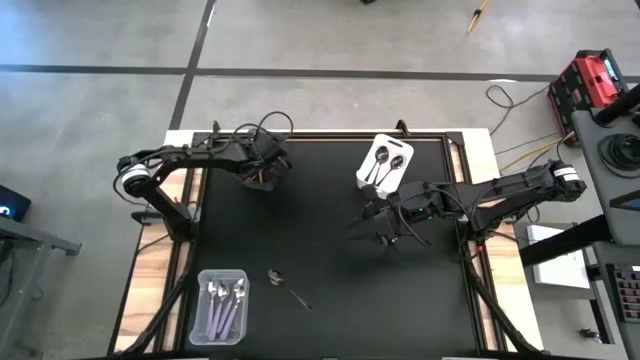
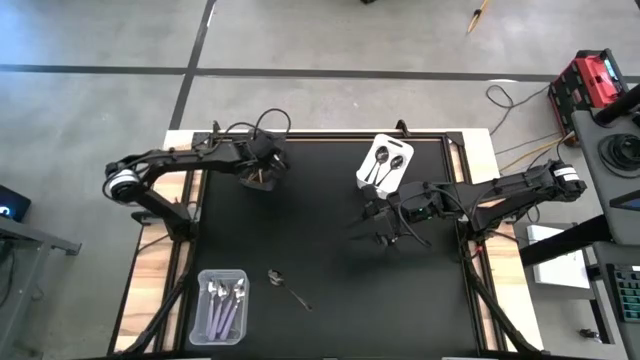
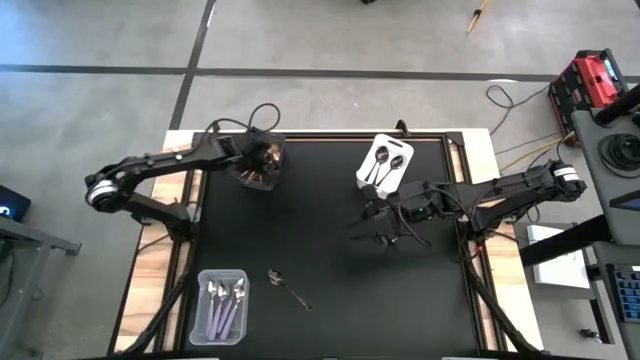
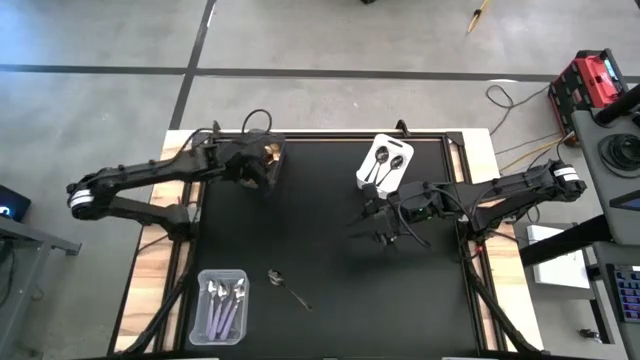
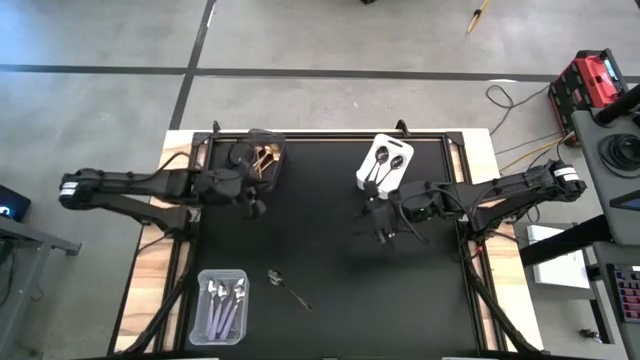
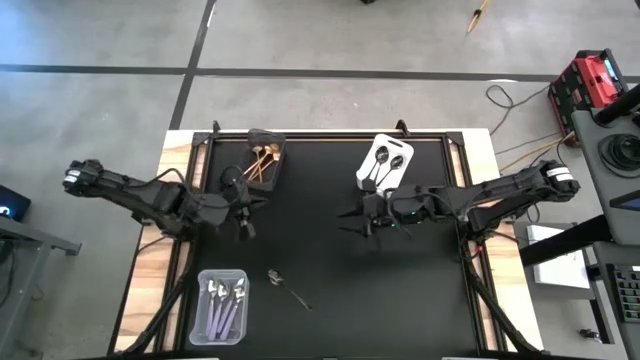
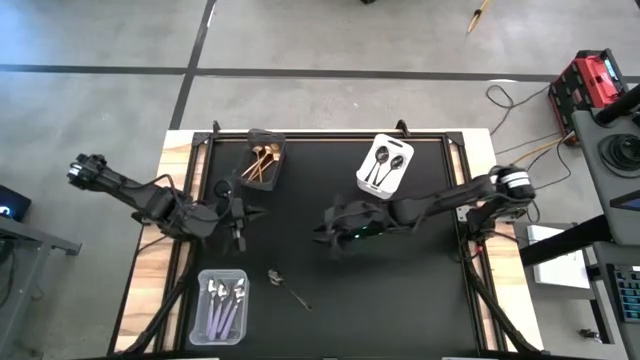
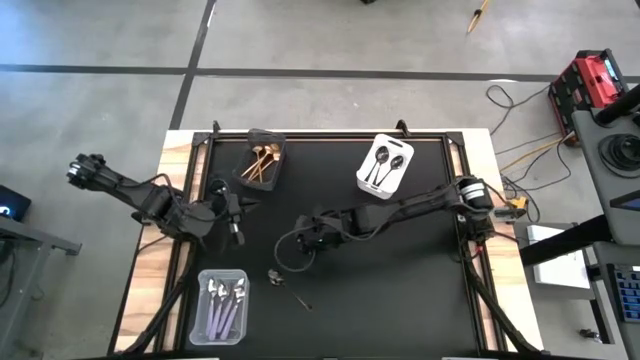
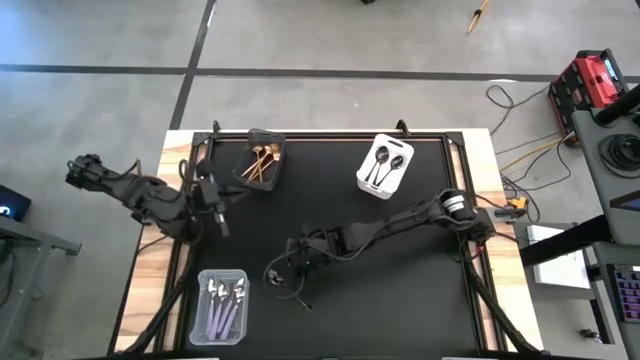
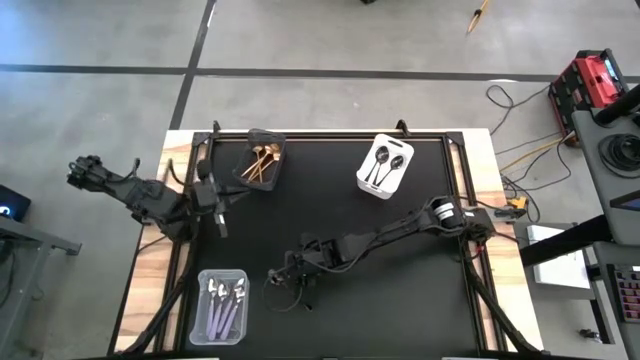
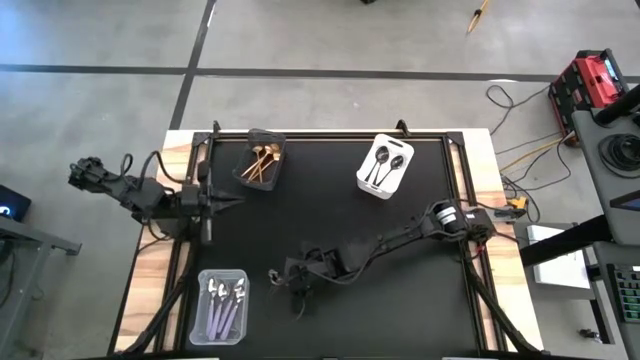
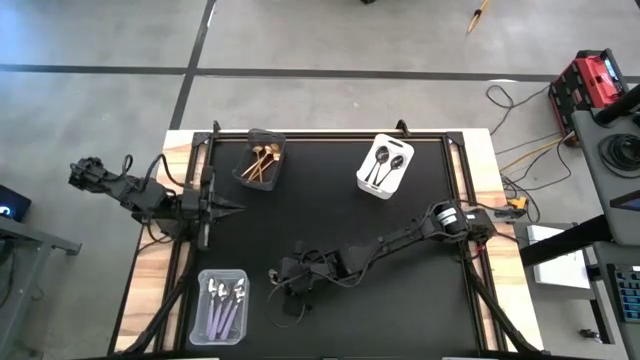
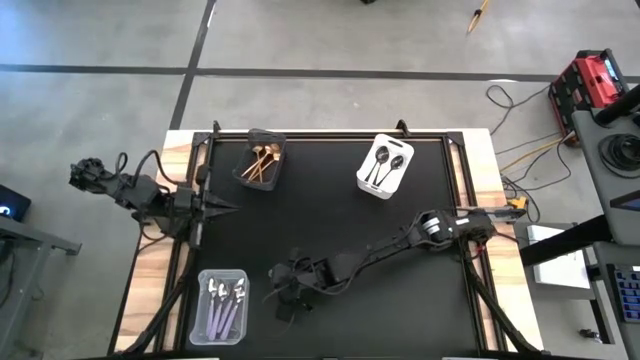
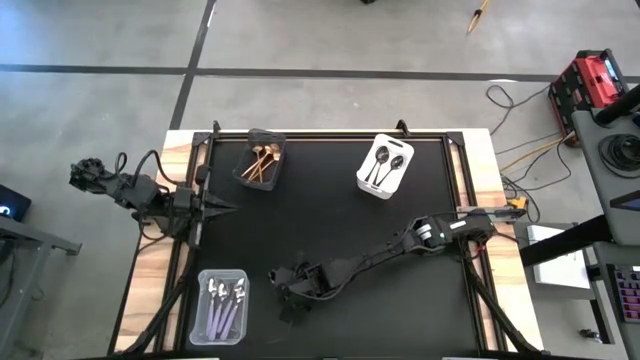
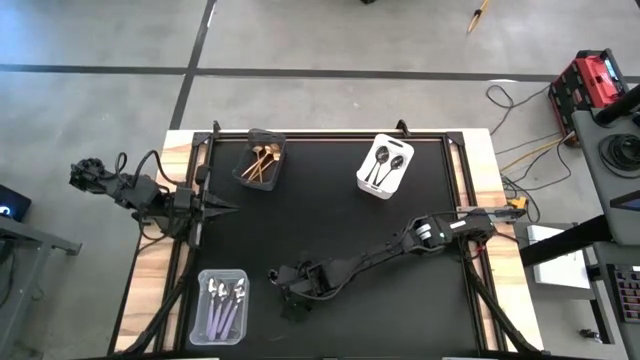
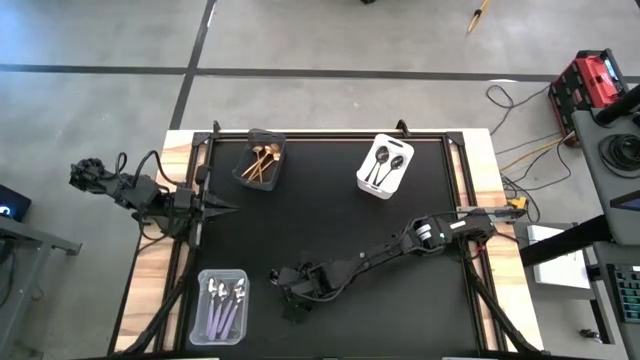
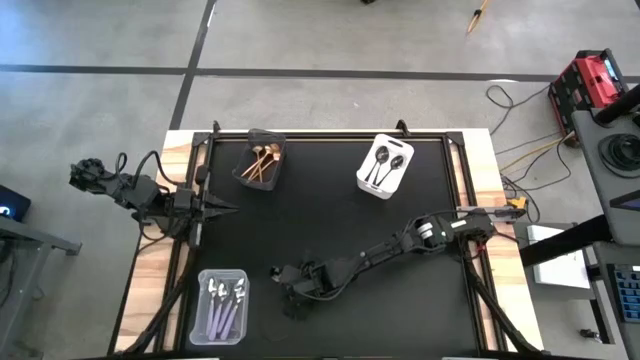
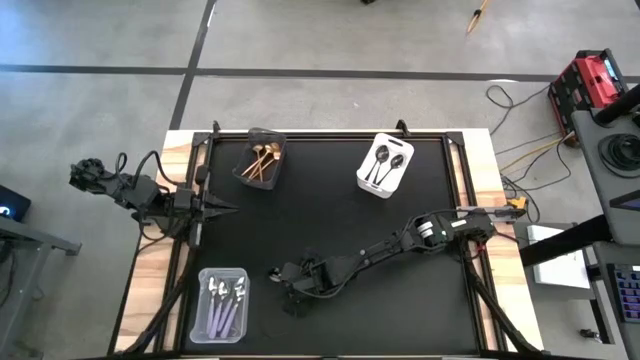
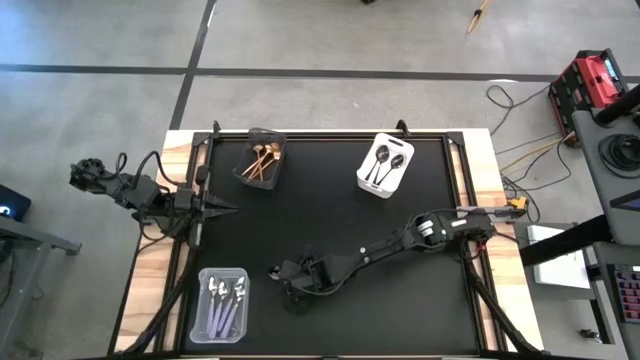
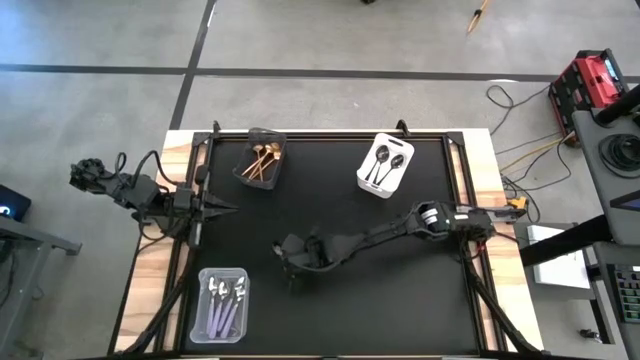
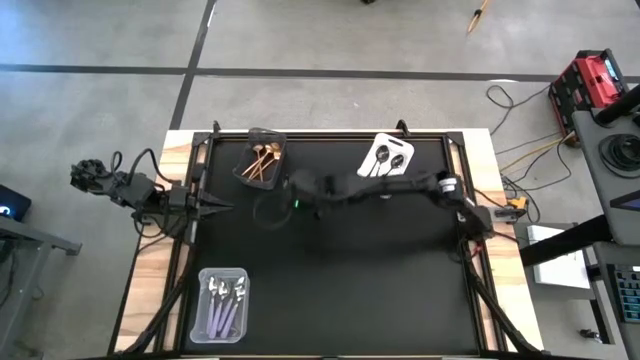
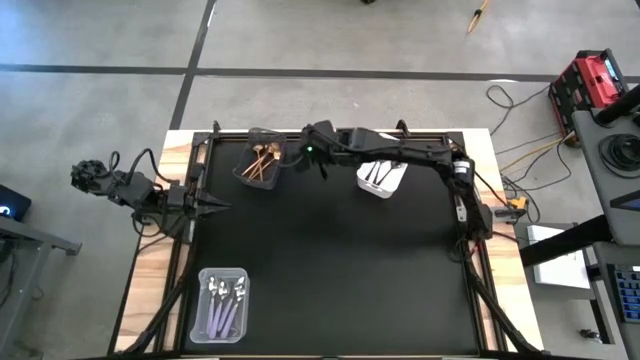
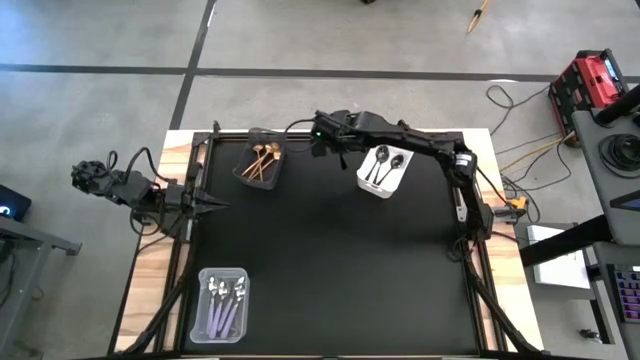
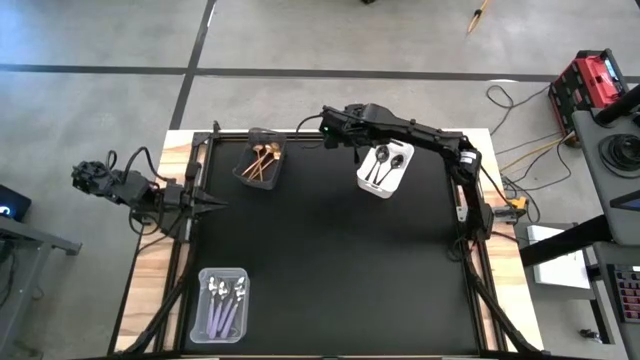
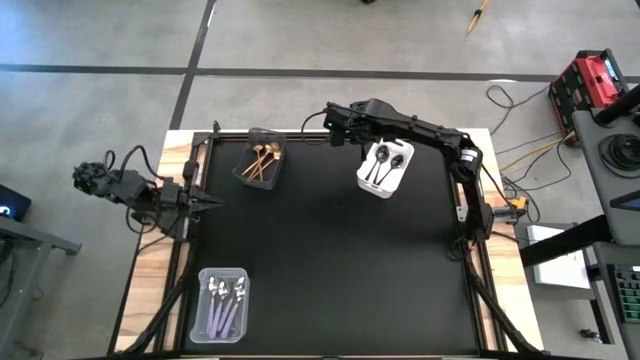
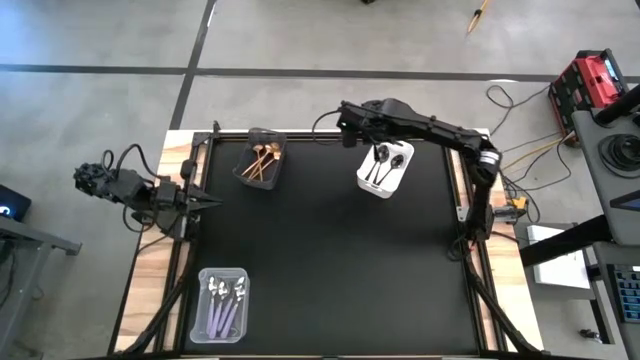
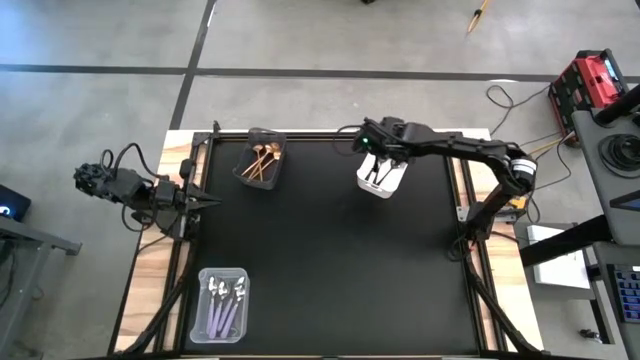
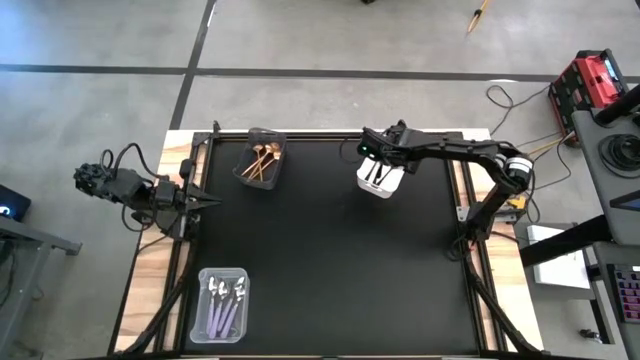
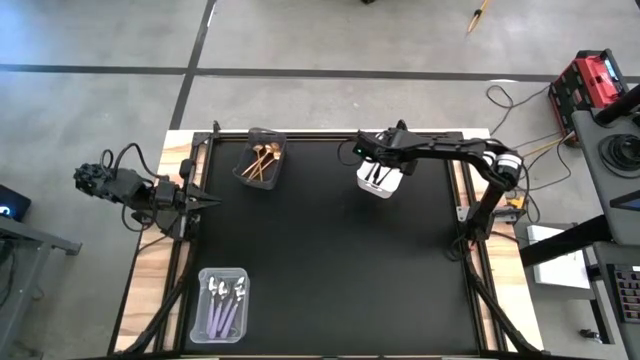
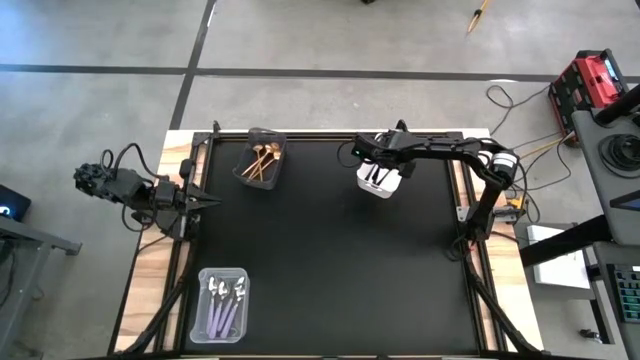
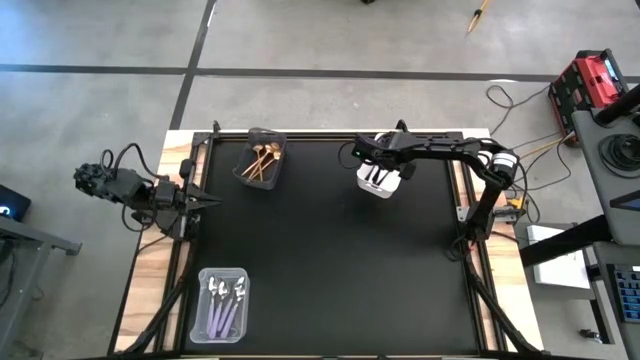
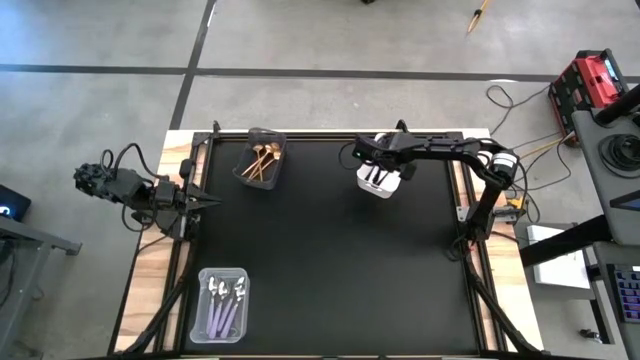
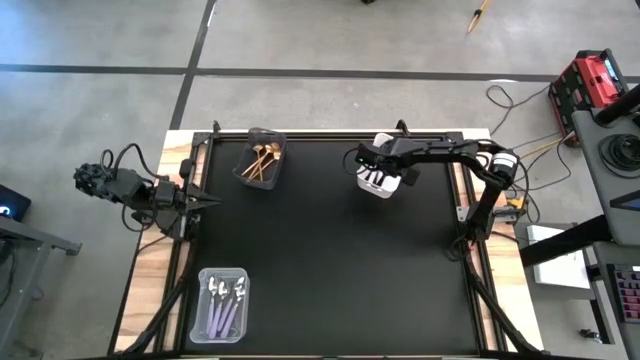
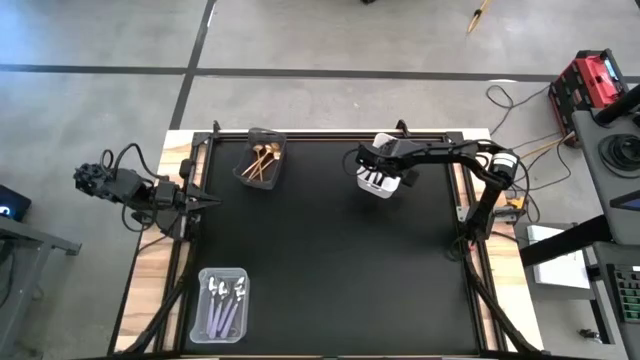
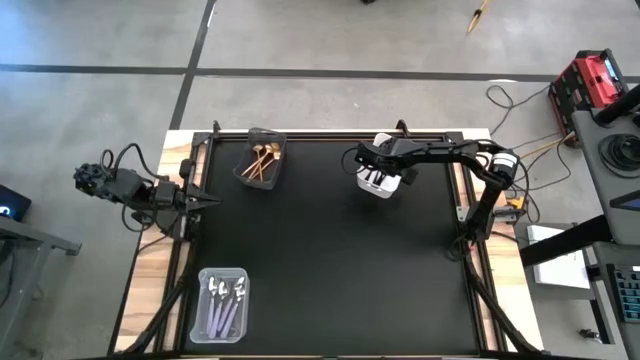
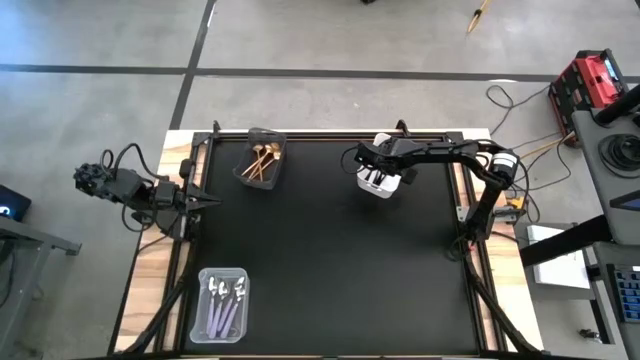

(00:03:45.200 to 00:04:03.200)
Task: Sort silverware by color (type)
Put the black spoon into the white bin

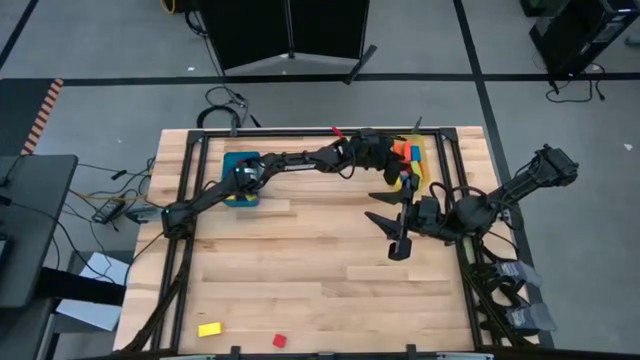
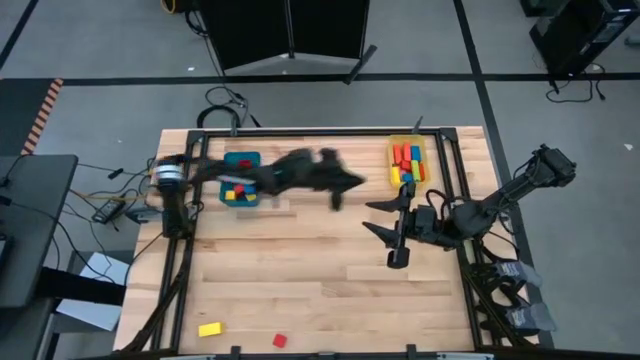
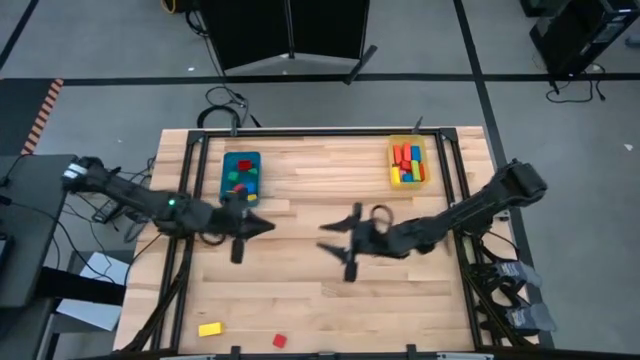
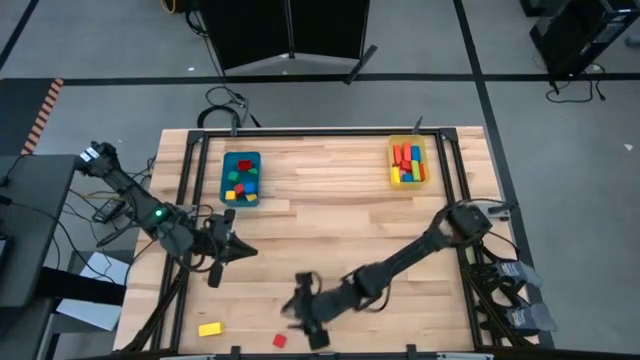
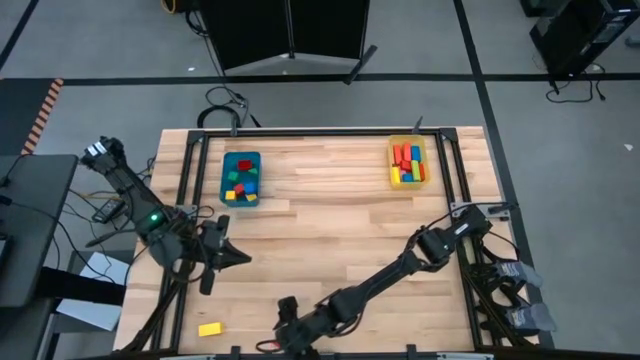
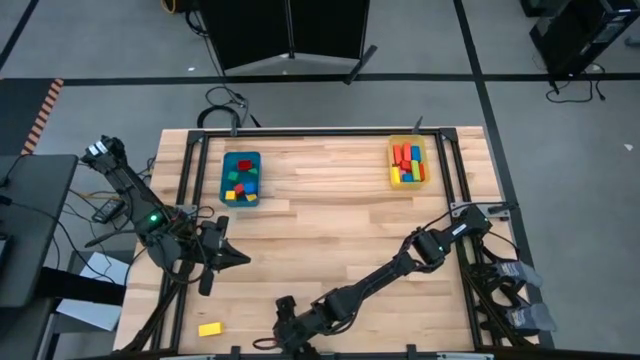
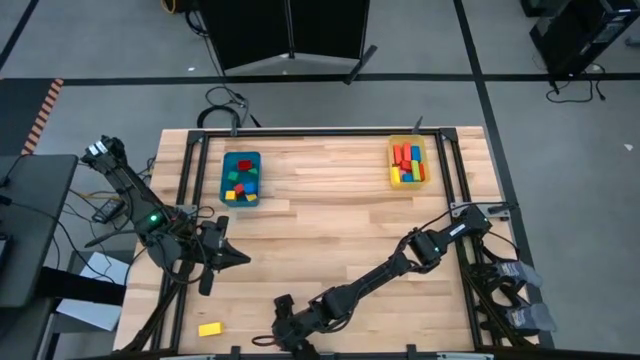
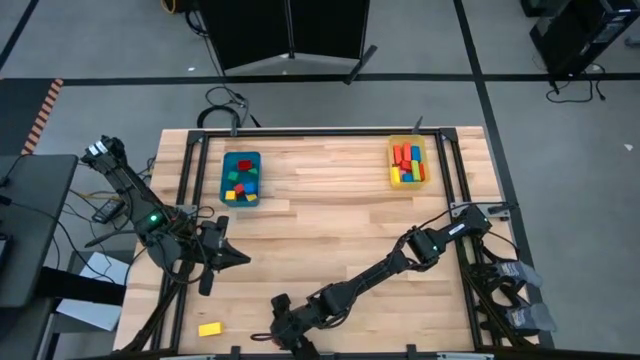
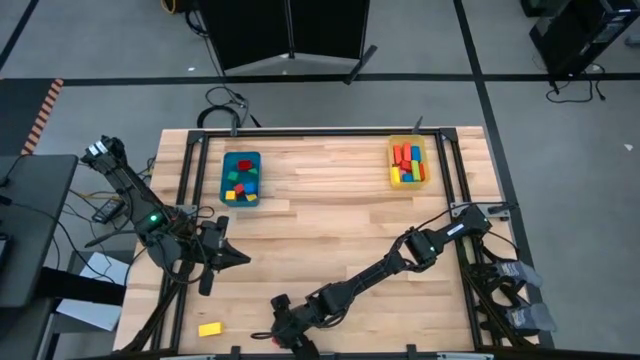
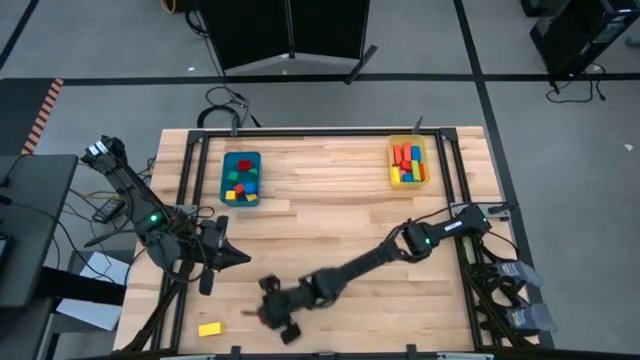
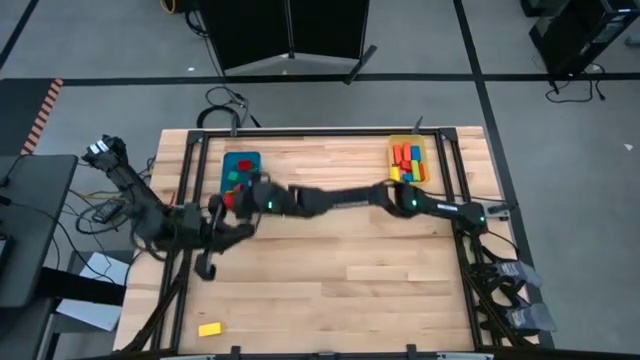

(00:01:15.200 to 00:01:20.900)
Task: Sort blocks by size
Put the small red block into the blue bin
